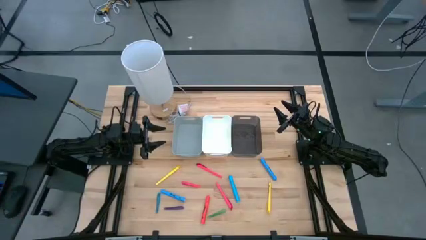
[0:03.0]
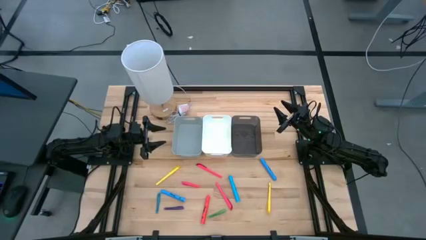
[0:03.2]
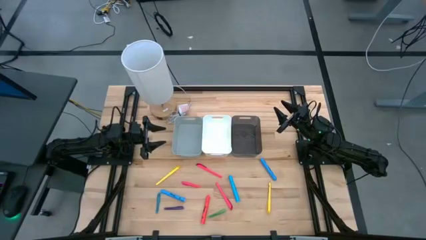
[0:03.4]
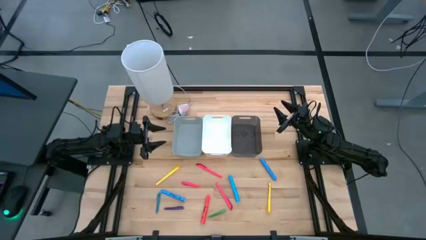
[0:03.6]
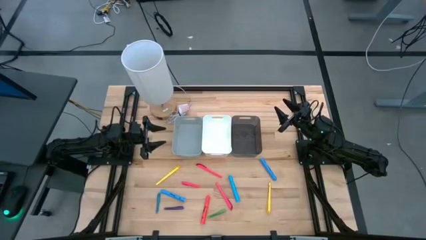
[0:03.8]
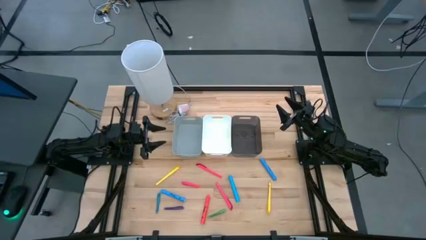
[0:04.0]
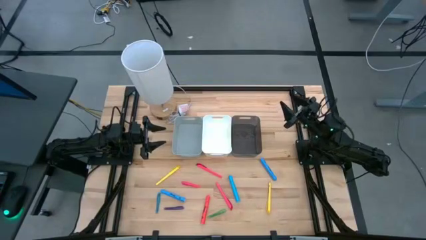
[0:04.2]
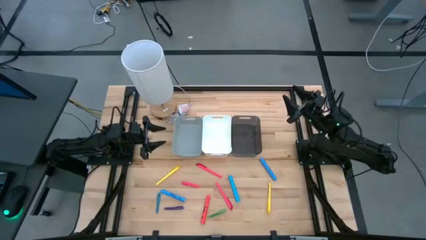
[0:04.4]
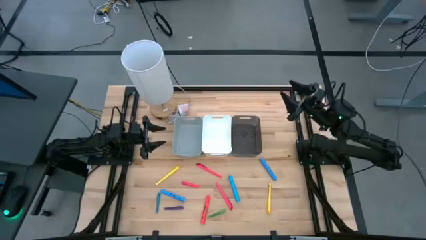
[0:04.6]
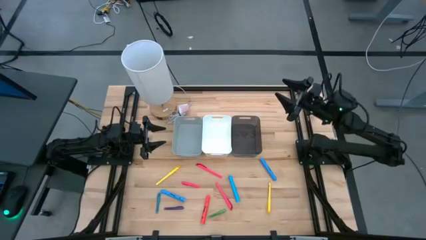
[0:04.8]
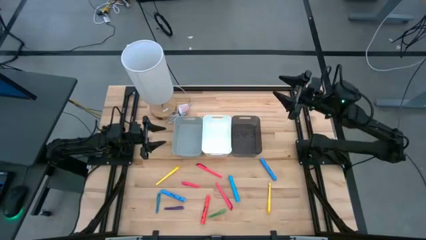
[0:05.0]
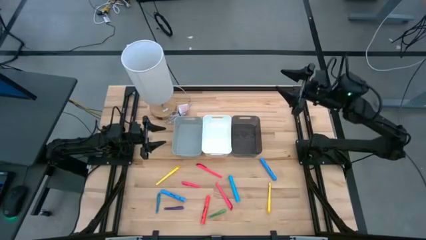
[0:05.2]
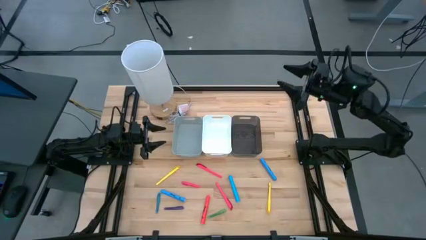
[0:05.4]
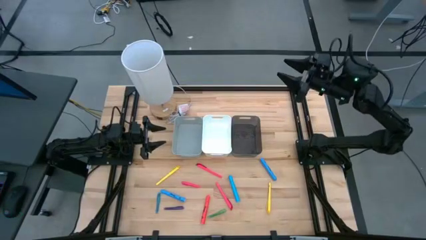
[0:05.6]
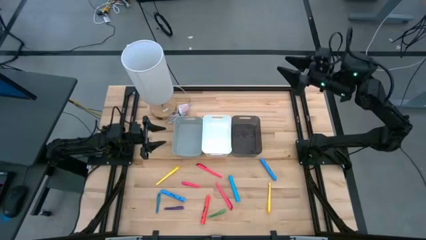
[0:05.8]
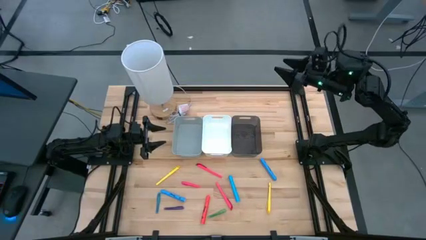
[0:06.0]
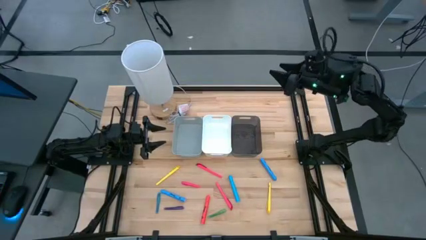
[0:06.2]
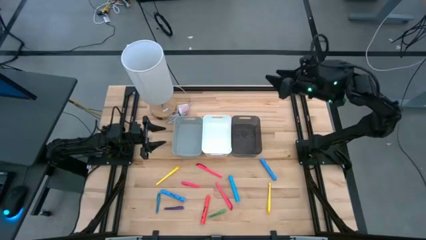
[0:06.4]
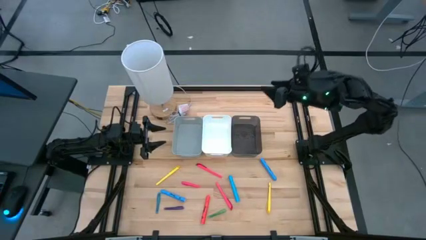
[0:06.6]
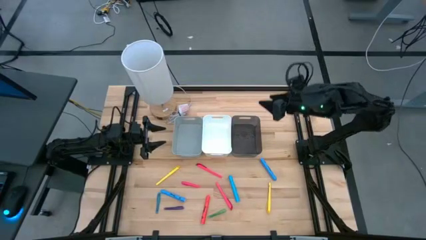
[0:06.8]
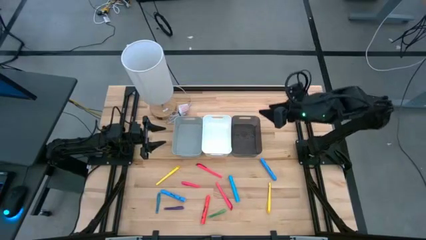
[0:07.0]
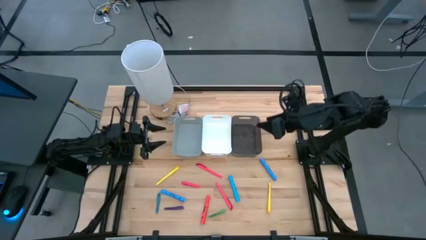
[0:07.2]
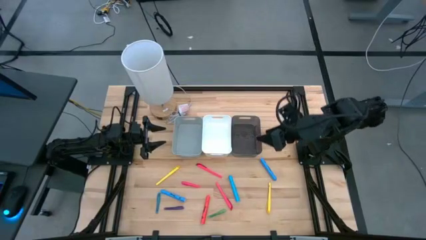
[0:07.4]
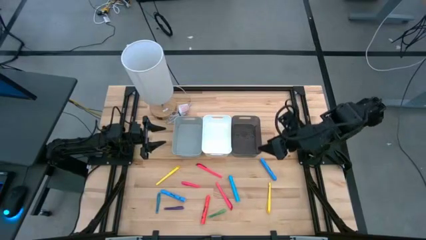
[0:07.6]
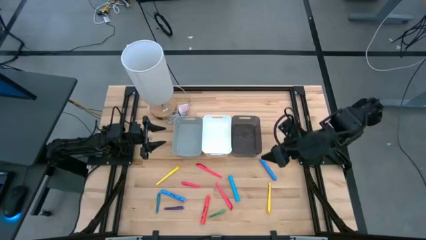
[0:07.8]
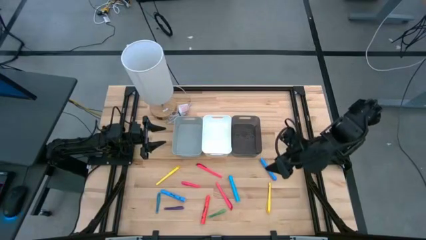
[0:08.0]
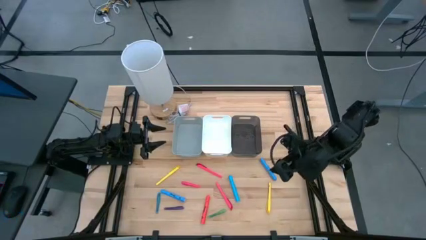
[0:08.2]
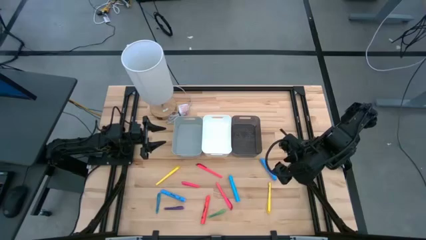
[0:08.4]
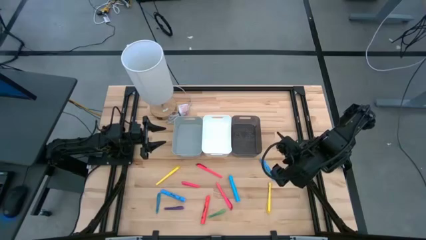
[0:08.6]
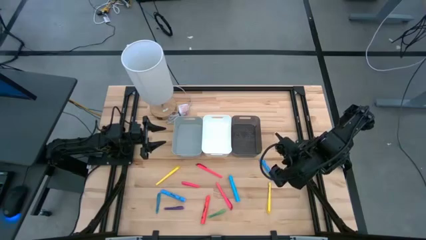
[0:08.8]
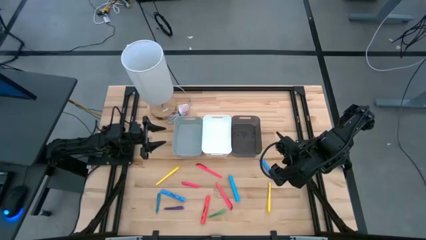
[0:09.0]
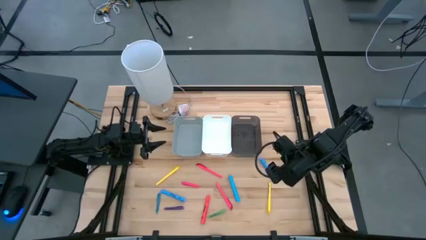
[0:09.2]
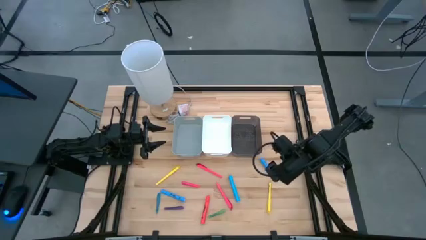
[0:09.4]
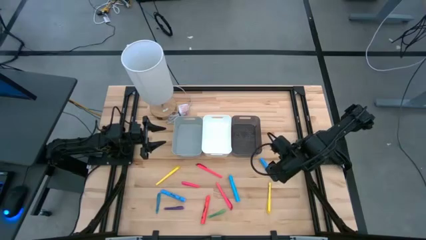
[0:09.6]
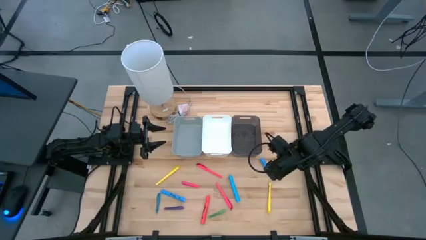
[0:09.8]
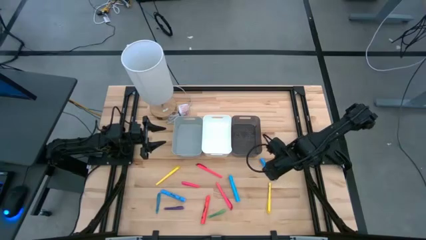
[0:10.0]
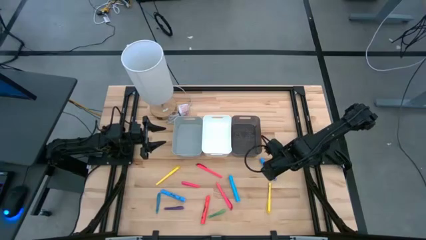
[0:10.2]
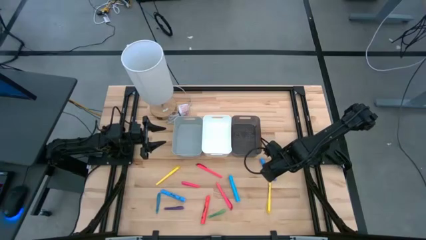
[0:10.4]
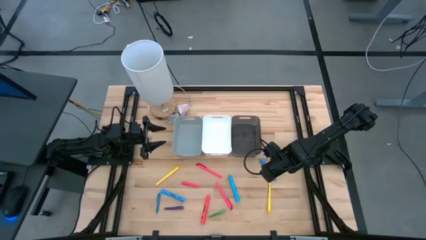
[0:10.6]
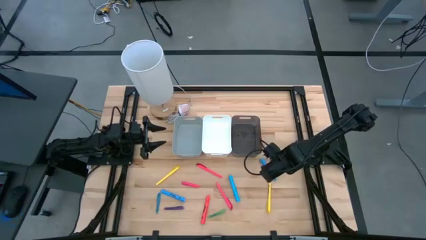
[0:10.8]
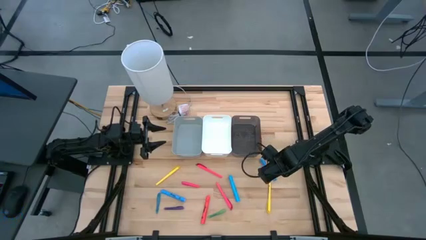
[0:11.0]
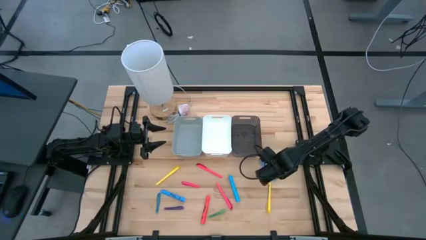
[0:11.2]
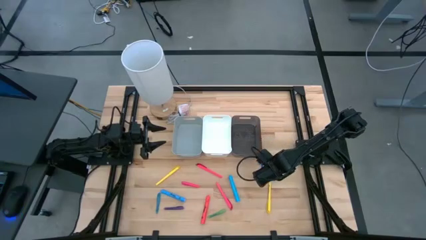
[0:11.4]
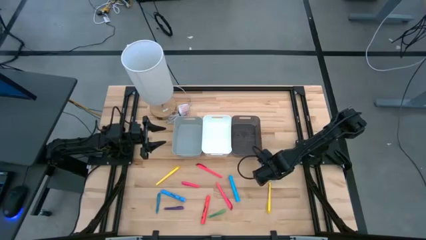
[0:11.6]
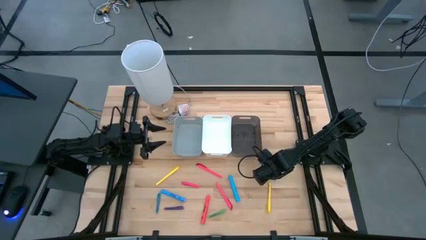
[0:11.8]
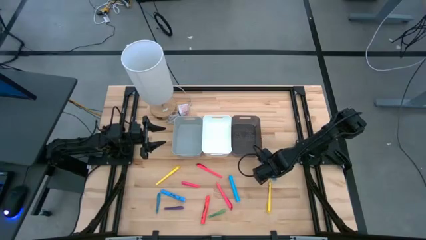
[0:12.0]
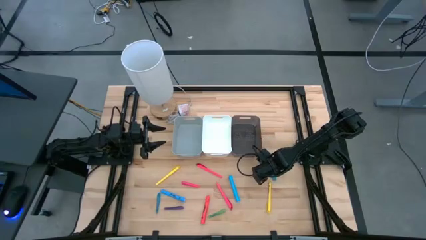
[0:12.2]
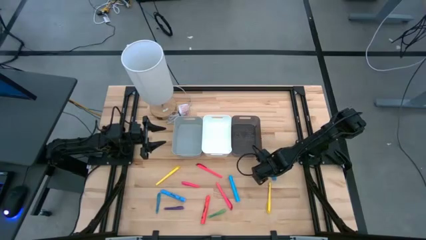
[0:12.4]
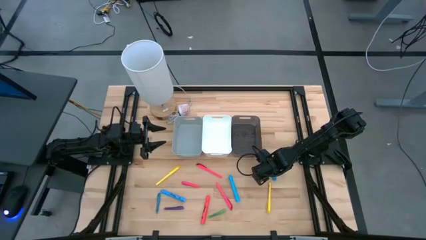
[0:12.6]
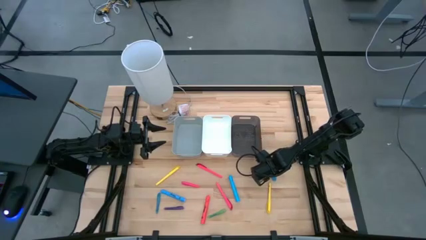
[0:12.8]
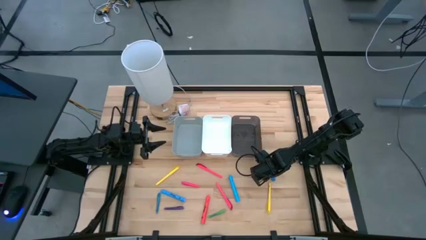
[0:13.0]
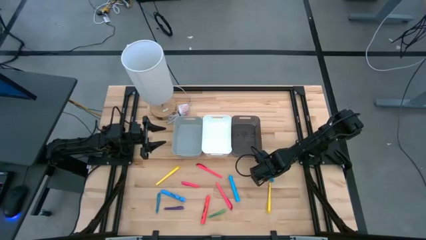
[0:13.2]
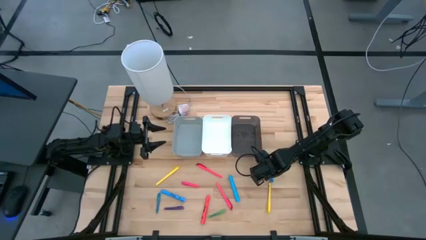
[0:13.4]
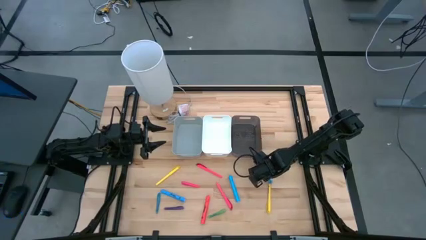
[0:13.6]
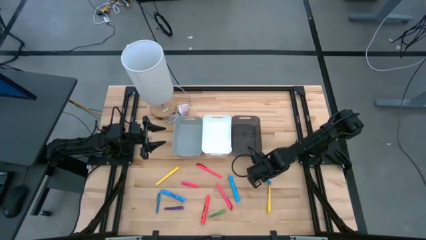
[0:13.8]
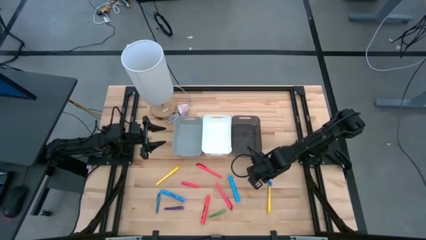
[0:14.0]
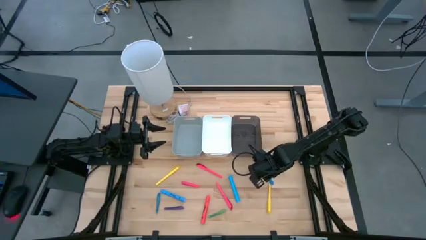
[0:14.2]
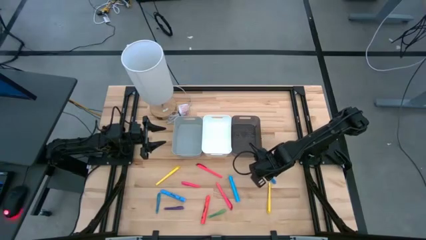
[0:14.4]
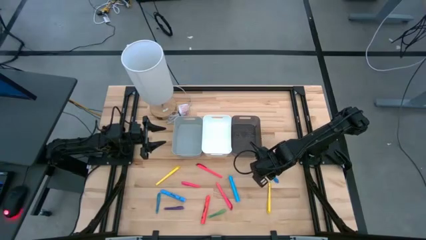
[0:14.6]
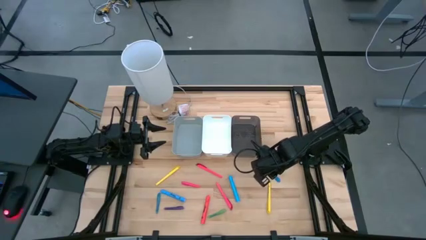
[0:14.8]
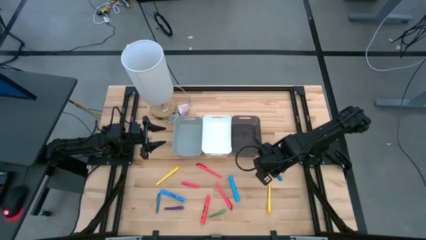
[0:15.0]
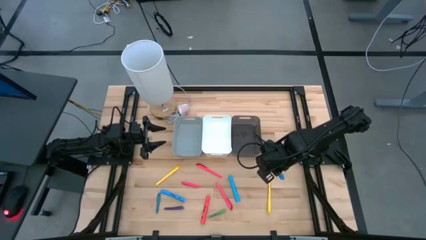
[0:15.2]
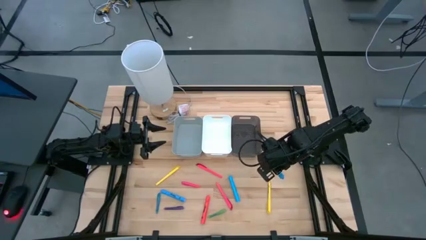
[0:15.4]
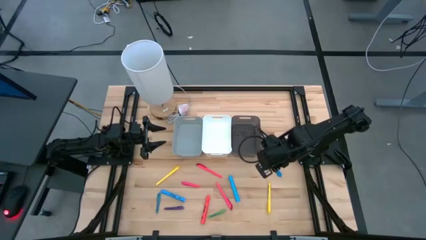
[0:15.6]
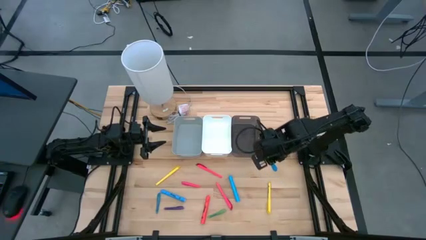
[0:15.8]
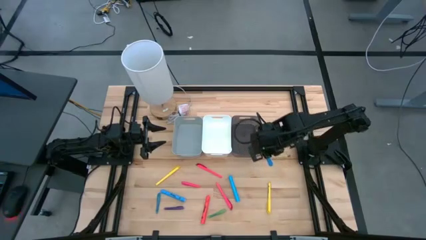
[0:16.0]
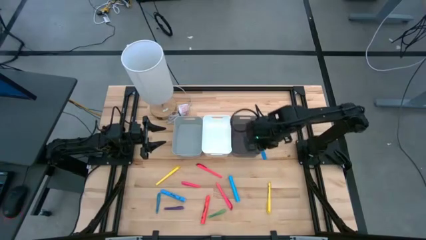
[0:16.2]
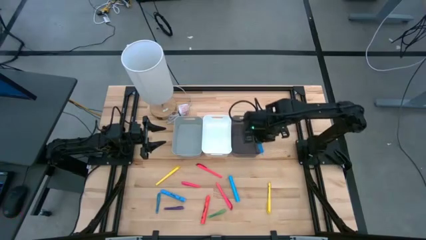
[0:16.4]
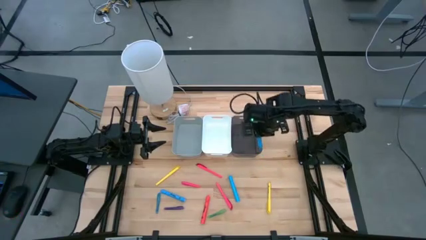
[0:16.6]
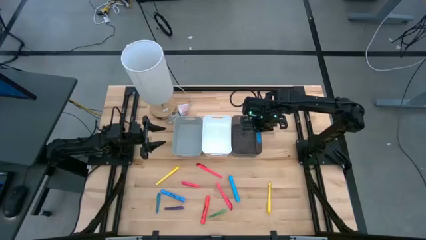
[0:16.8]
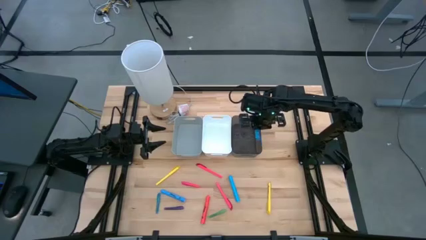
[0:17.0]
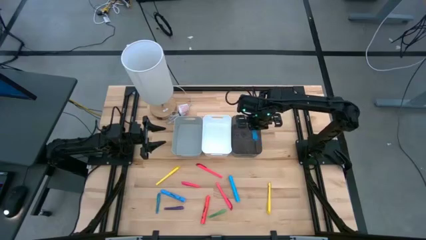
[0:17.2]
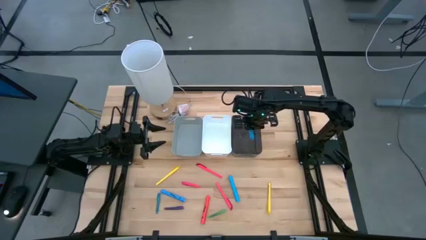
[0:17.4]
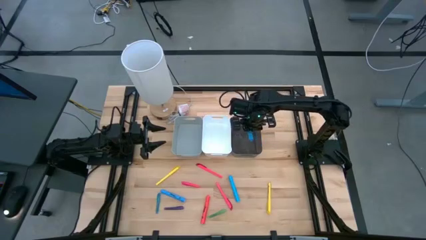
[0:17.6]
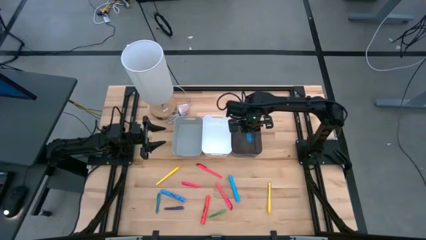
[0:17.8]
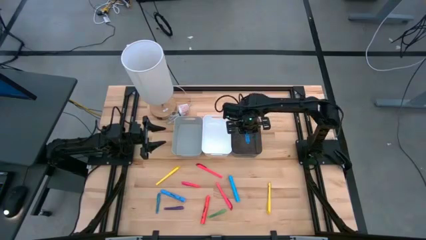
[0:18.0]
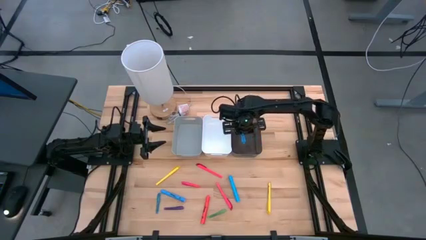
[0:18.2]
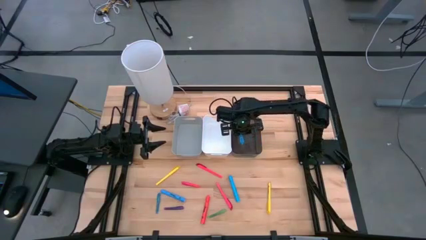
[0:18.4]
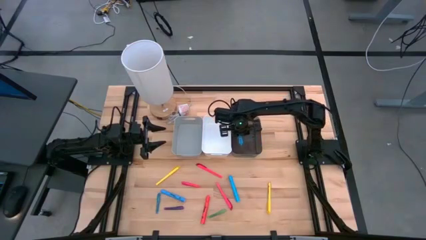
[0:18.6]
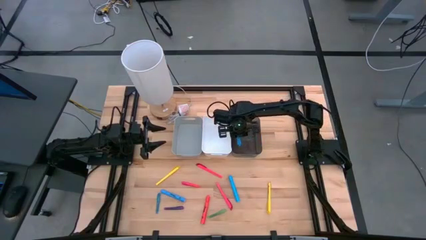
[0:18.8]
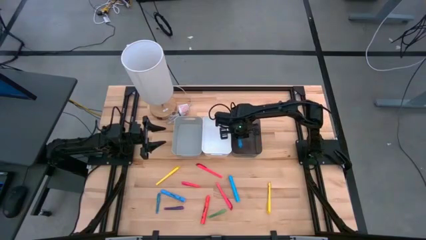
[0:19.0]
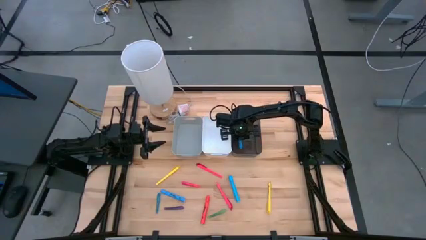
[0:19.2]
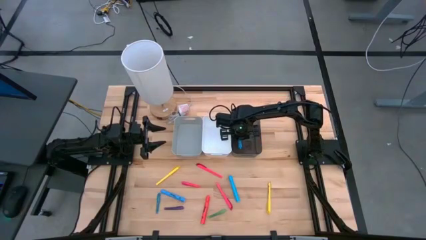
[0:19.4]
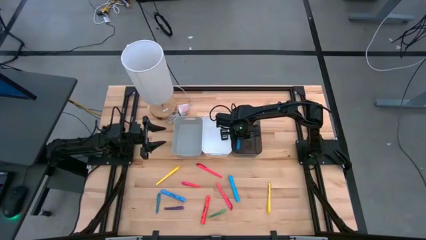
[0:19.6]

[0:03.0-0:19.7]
Task: Pick & Place Markers
Put the top blue marker pen into the black bin
